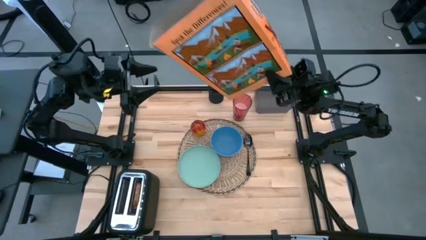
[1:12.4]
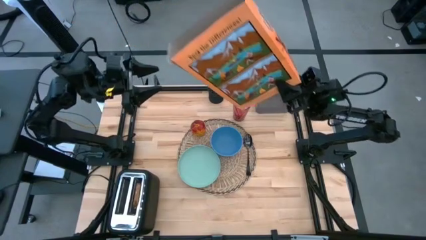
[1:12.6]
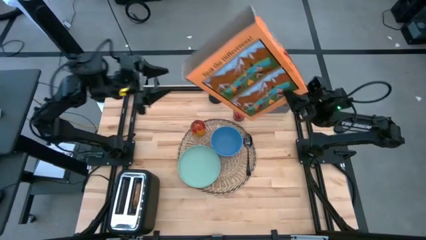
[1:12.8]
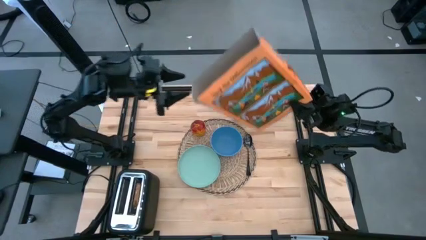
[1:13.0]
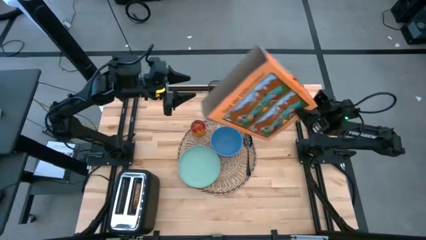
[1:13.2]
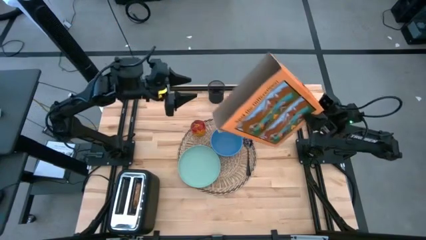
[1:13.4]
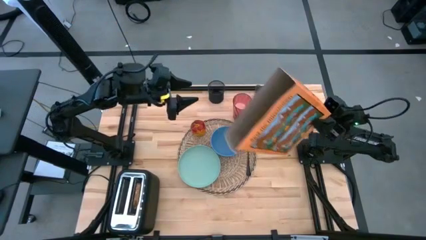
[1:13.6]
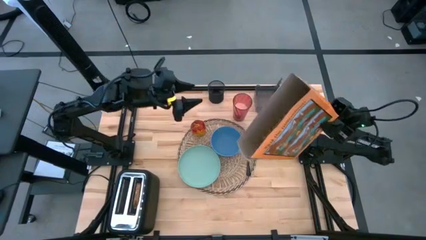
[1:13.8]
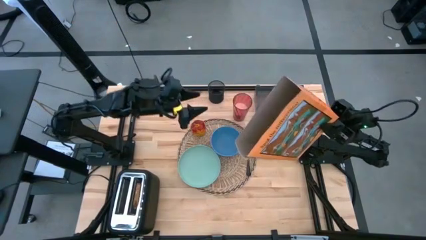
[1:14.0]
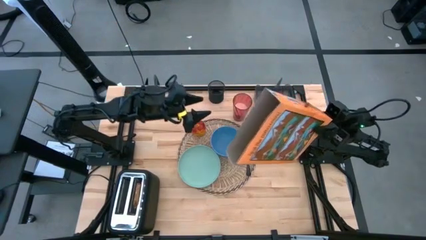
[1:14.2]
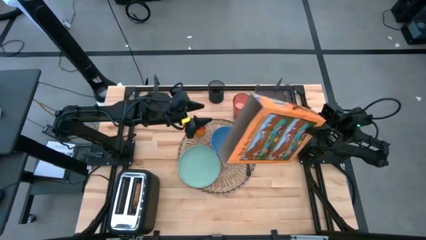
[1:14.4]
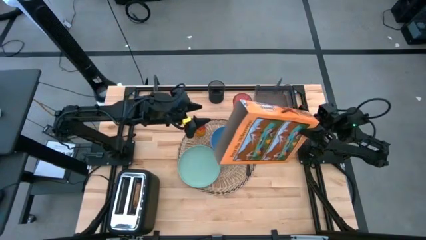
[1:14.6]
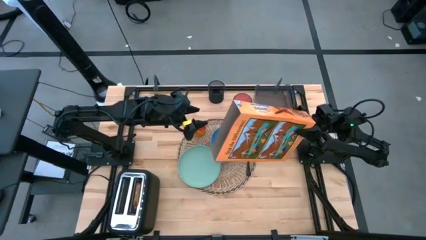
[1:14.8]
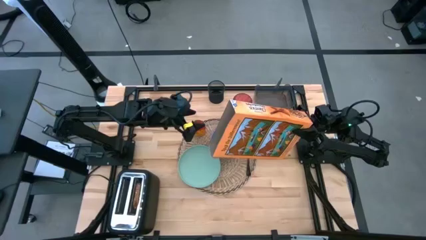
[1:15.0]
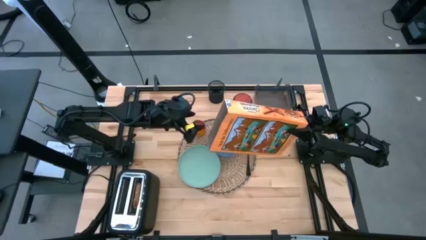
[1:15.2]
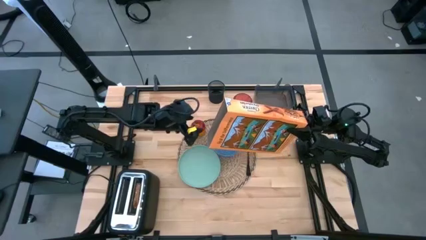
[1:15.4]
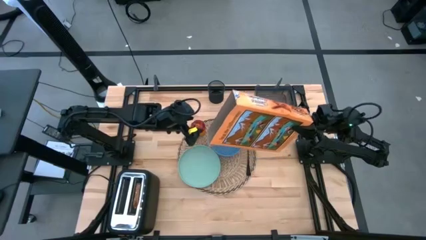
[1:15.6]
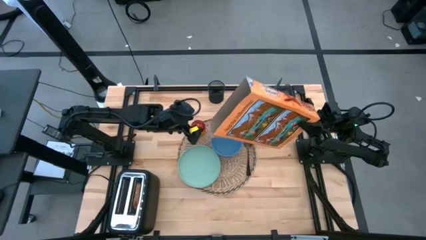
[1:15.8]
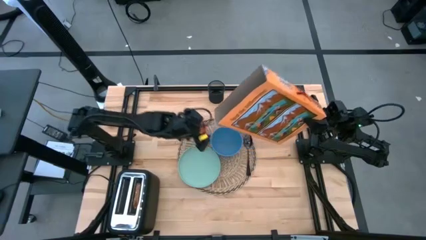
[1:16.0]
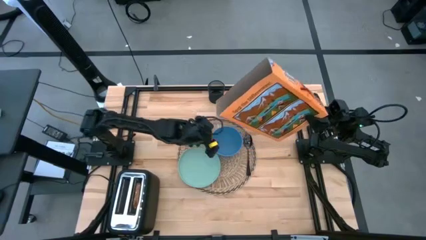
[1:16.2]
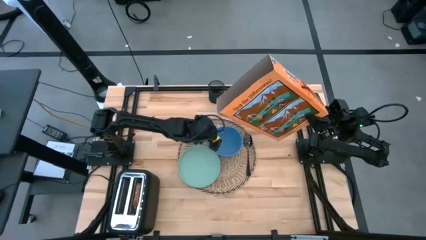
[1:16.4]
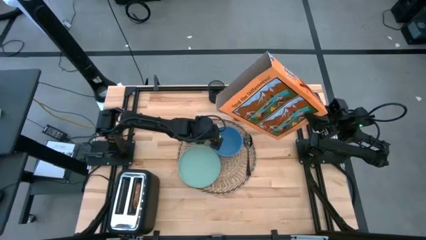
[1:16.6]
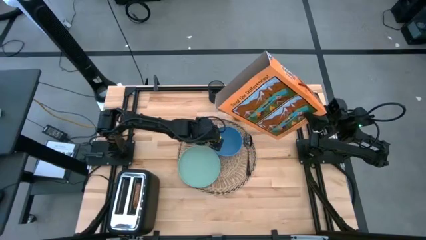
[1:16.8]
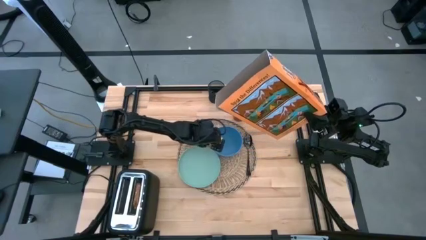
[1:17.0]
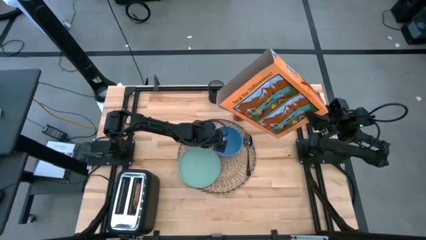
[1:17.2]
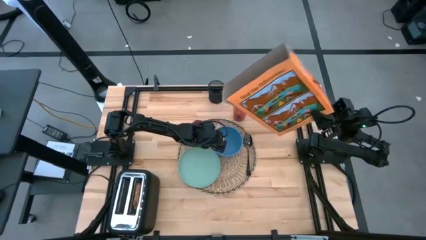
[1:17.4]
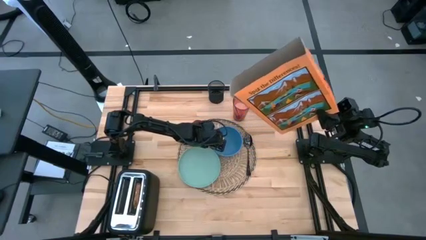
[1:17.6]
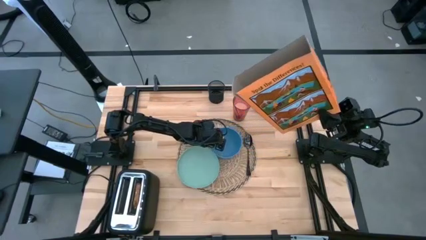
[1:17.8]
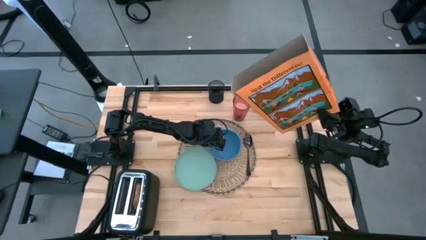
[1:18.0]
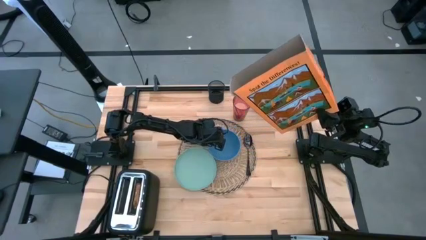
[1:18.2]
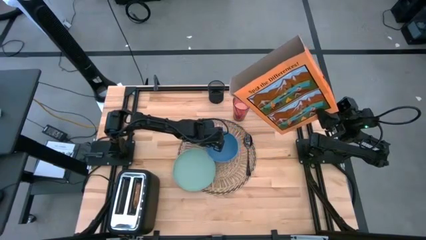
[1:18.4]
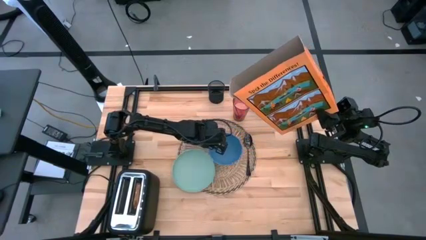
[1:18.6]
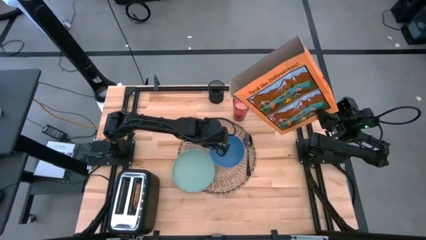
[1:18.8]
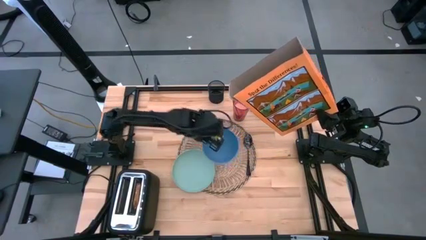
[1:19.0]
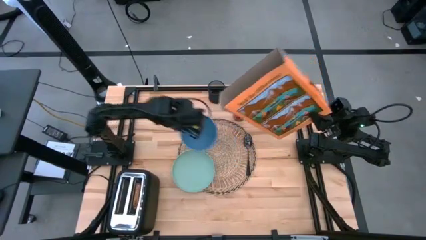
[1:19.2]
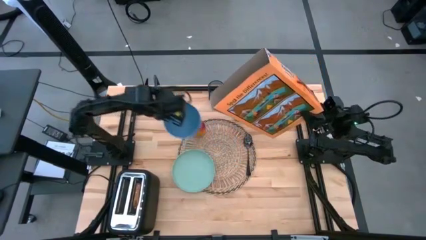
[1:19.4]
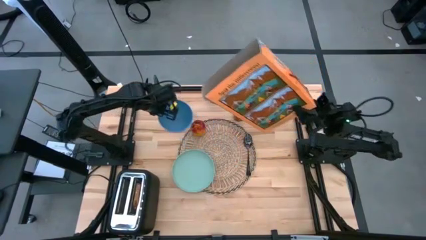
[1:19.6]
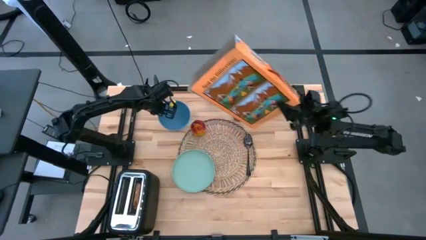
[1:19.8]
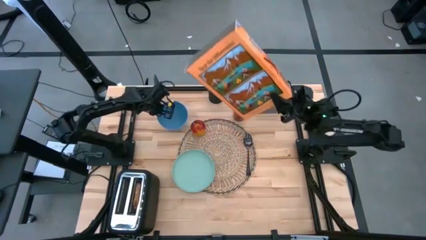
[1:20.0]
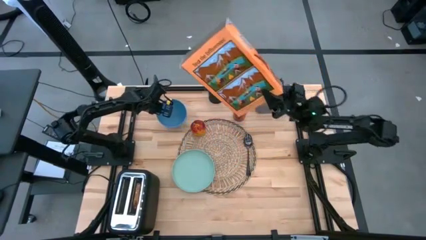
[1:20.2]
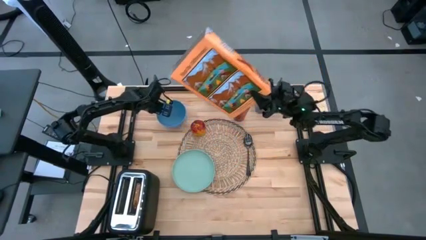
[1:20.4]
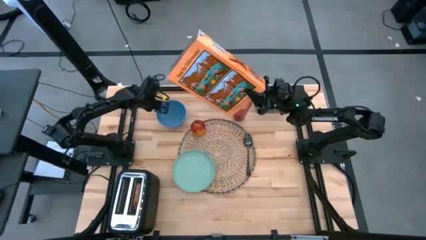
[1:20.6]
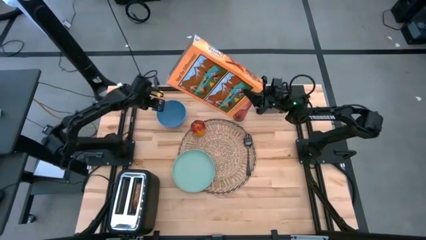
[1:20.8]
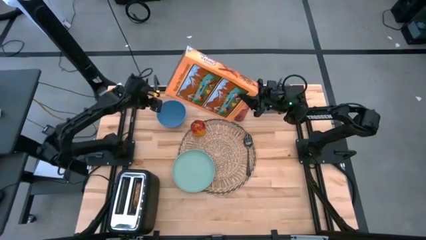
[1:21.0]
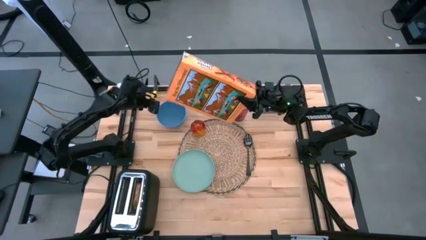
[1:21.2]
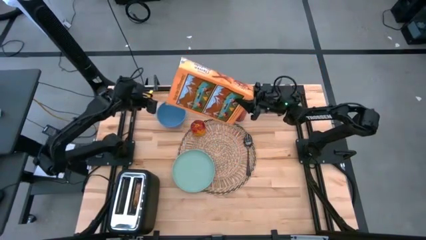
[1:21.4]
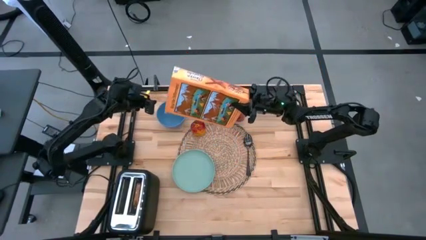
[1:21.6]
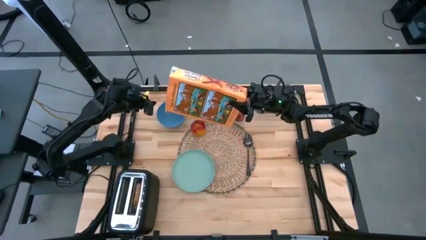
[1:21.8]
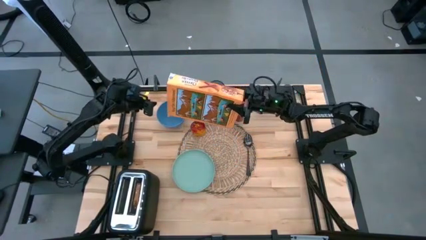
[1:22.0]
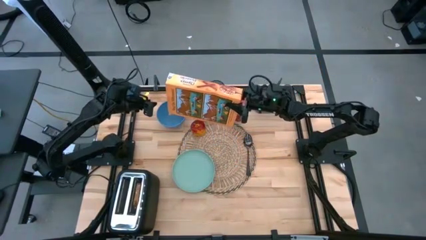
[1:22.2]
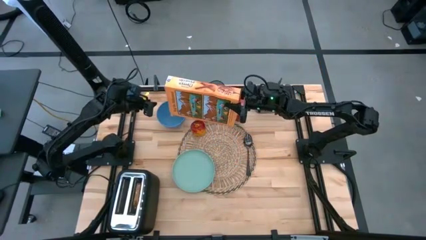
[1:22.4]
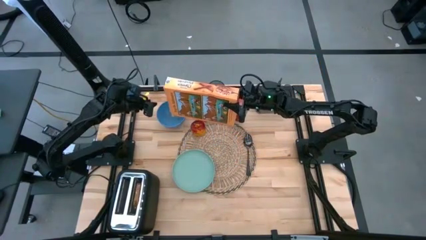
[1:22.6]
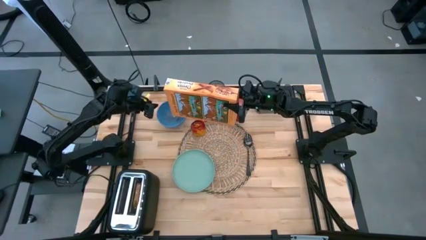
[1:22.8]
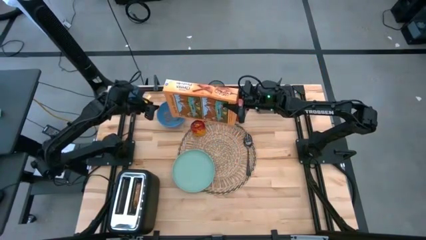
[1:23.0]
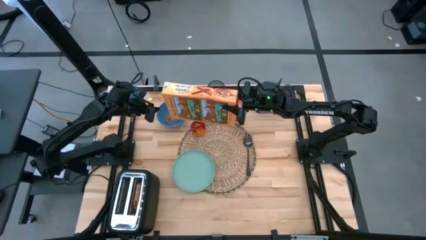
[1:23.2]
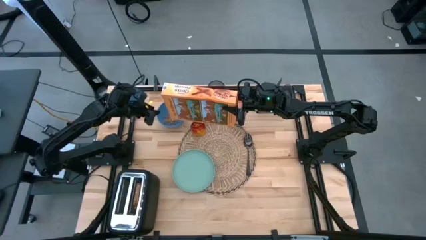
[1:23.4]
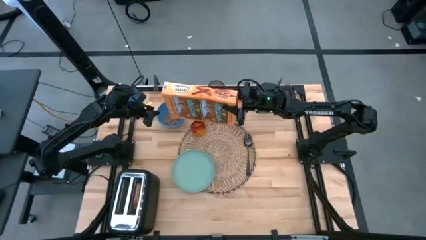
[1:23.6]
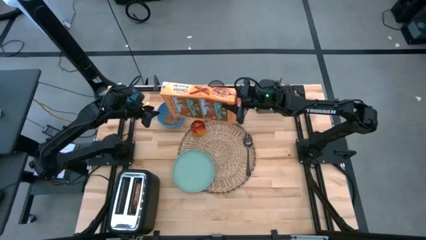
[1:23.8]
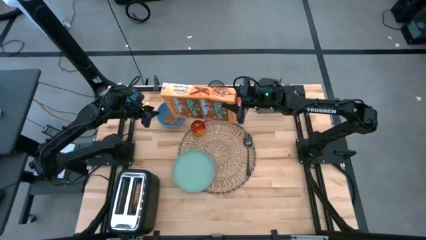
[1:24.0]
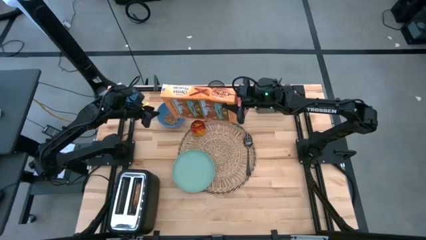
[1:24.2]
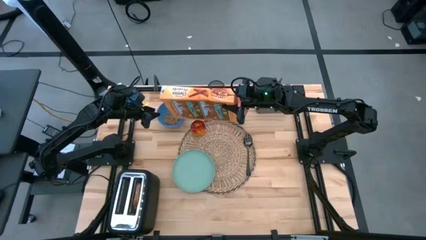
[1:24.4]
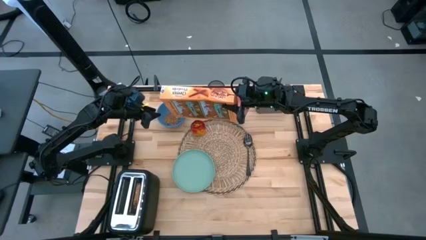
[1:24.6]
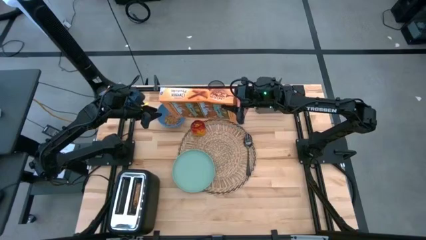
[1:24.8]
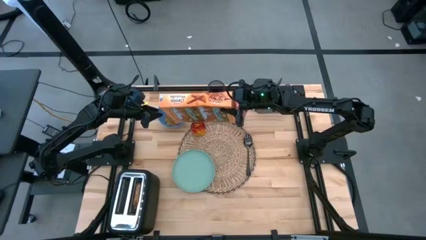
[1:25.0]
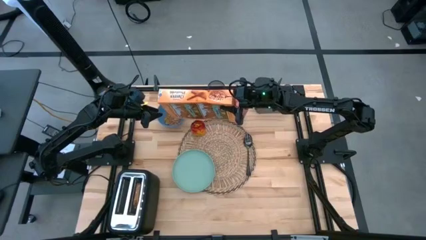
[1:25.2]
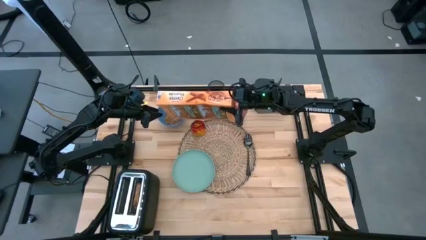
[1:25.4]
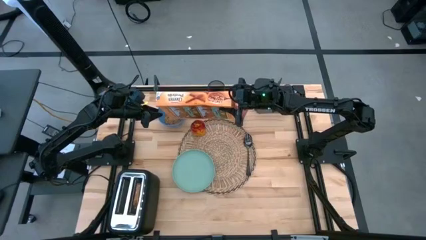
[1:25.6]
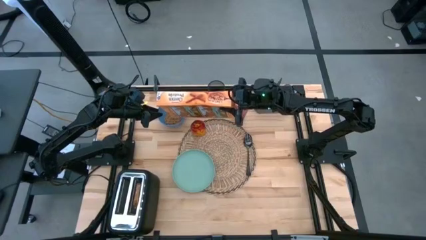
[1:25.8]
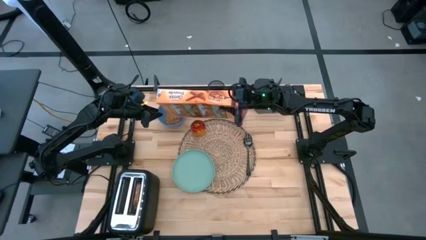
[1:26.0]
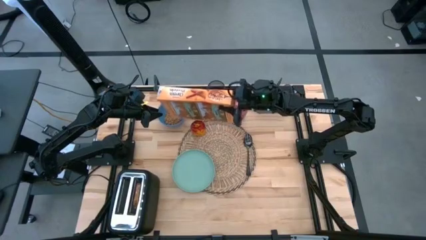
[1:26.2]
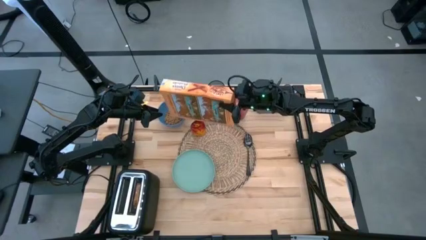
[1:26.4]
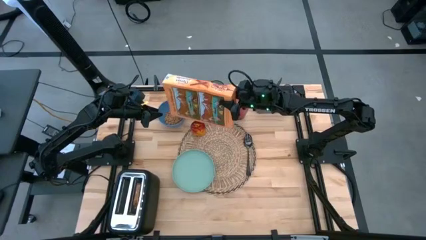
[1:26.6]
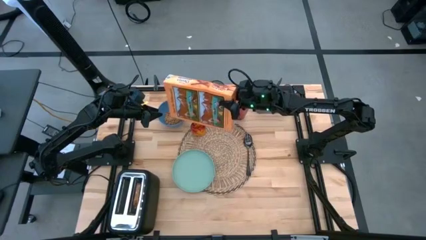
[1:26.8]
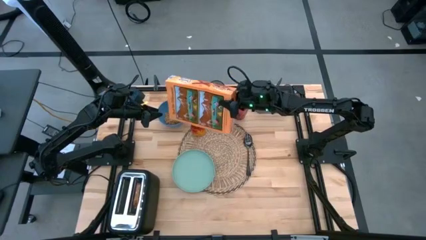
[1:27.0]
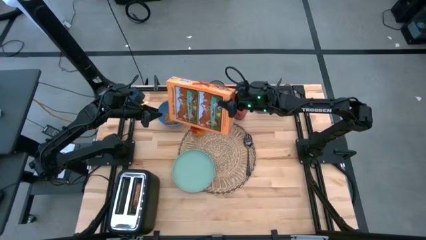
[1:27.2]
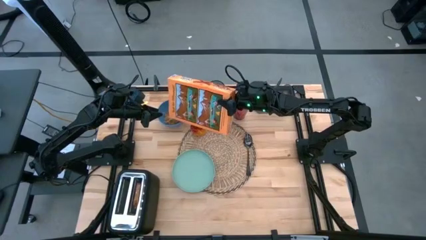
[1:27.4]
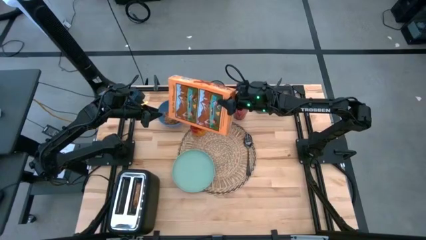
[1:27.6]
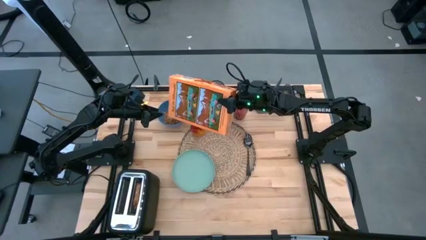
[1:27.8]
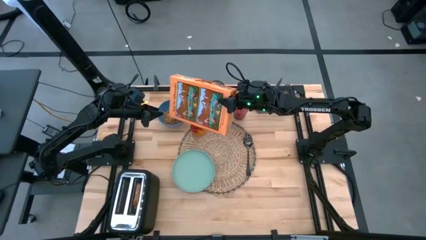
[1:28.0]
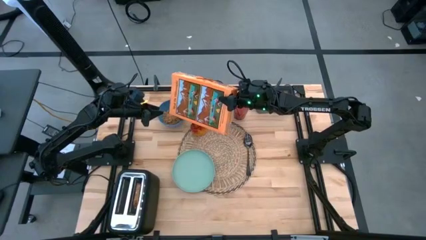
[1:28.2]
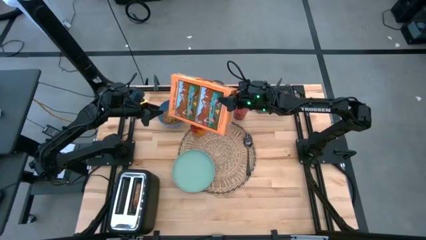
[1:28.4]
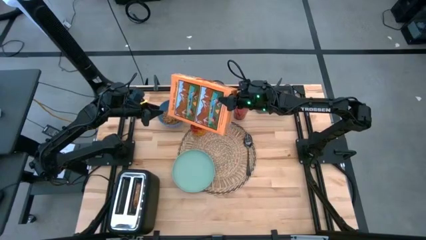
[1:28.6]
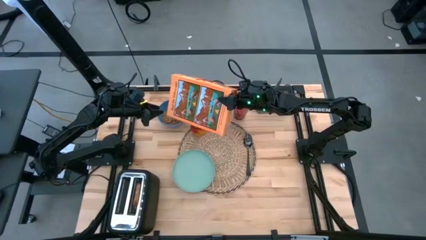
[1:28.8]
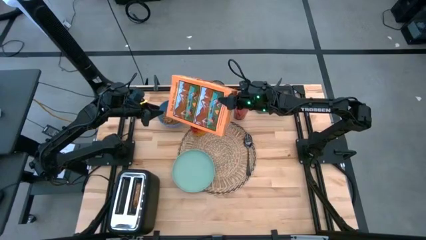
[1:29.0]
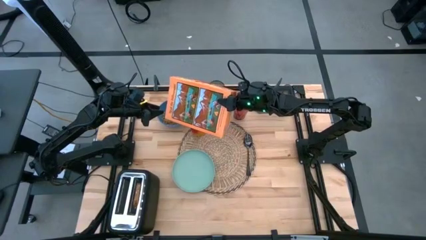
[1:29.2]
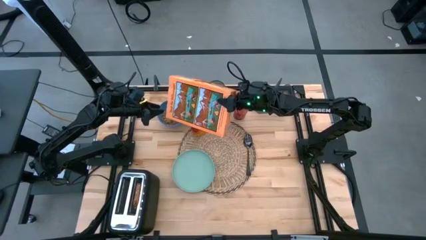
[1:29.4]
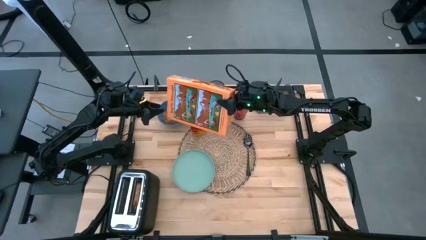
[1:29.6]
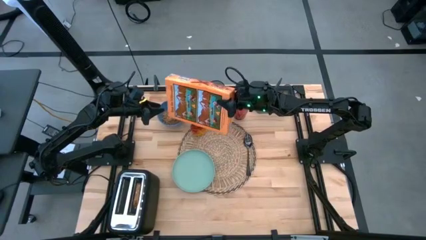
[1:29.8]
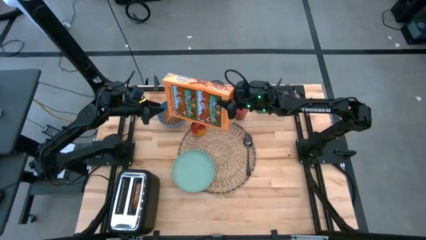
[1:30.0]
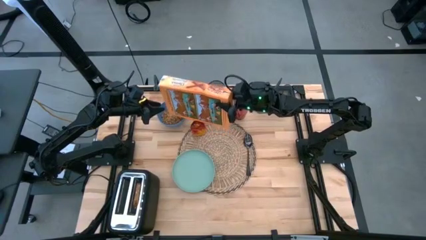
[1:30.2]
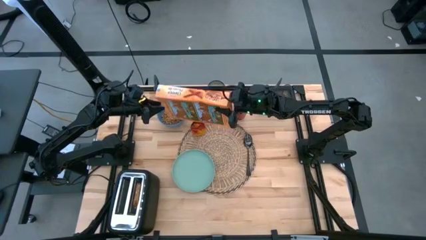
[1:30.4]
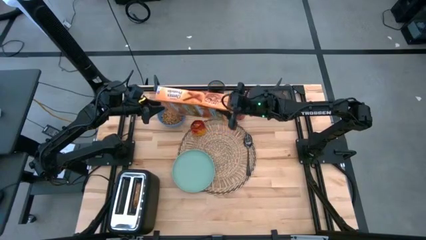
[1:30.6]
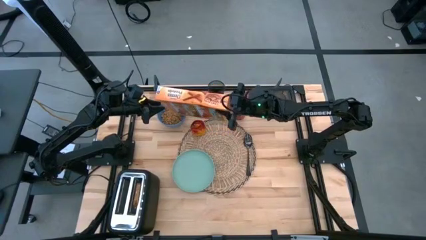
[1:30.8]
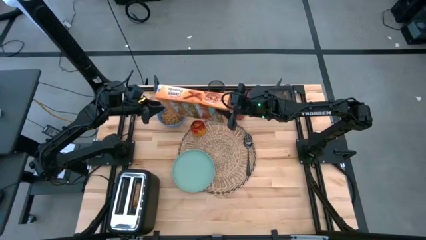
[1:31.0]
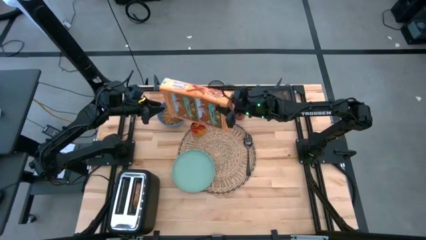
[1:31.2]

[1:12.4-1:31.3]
Task: Arrange a breakfast setting
Pour the cereal from the orange cereal box into the blue bowl
